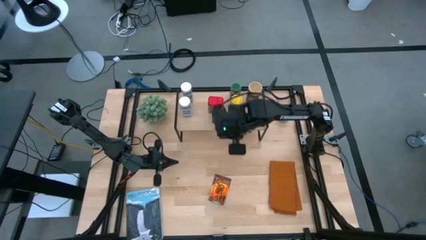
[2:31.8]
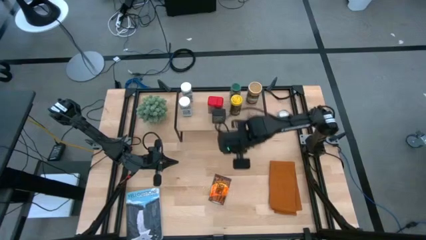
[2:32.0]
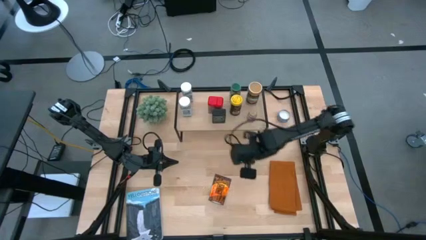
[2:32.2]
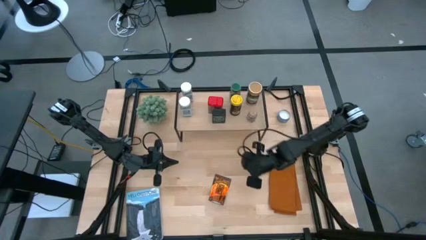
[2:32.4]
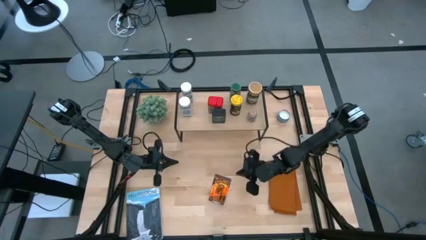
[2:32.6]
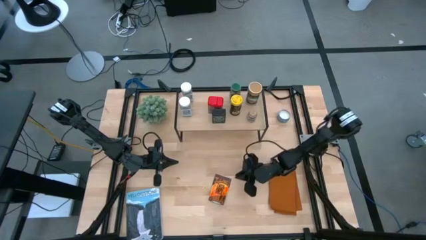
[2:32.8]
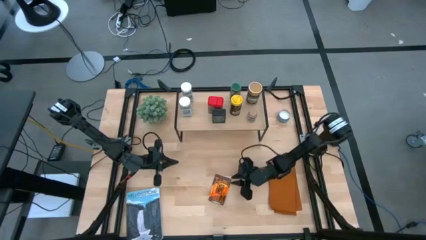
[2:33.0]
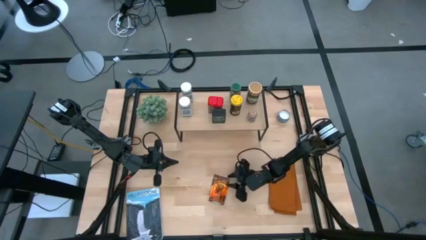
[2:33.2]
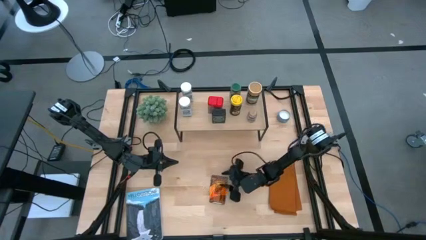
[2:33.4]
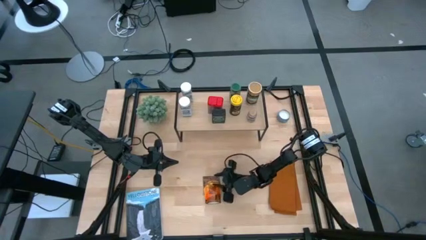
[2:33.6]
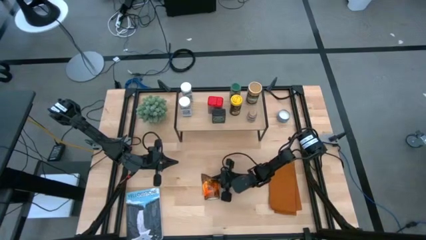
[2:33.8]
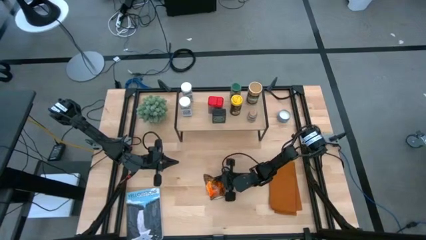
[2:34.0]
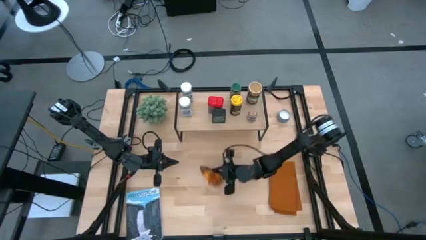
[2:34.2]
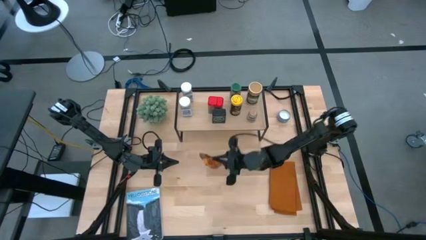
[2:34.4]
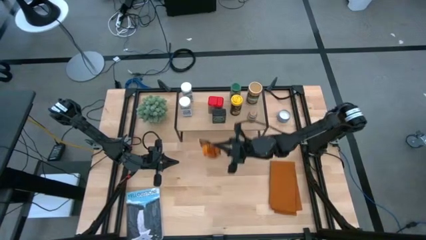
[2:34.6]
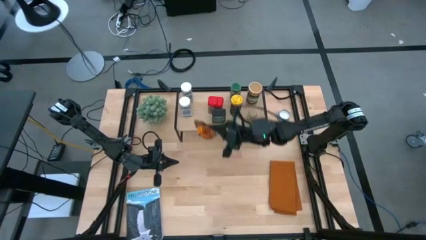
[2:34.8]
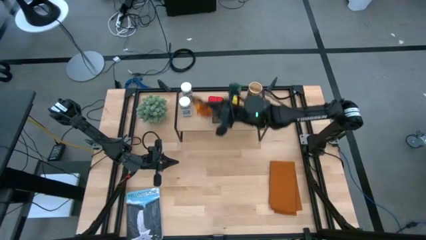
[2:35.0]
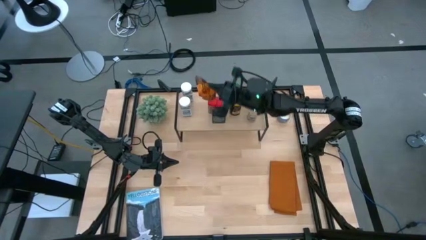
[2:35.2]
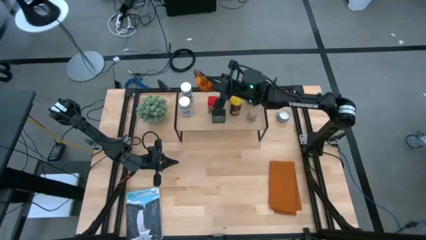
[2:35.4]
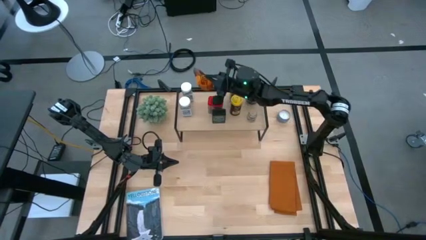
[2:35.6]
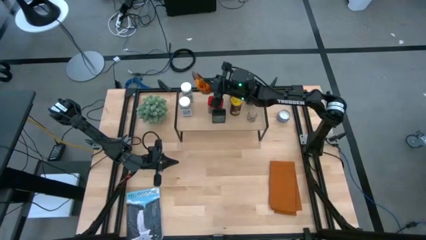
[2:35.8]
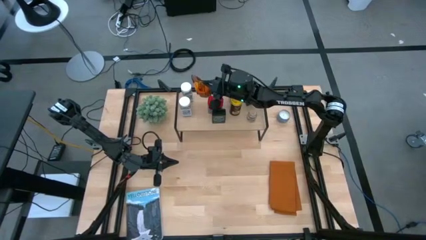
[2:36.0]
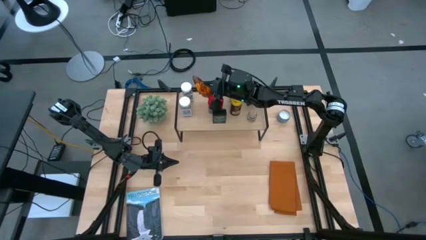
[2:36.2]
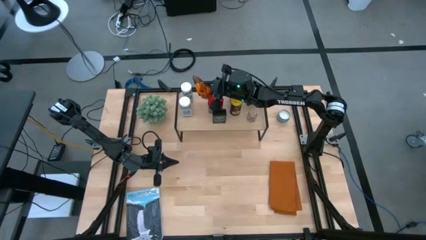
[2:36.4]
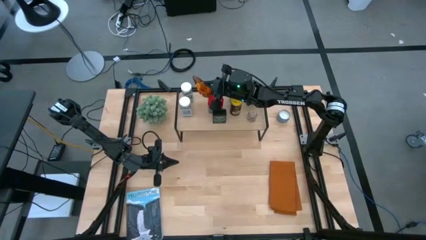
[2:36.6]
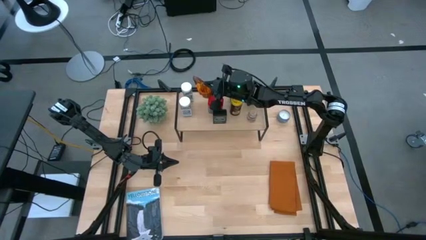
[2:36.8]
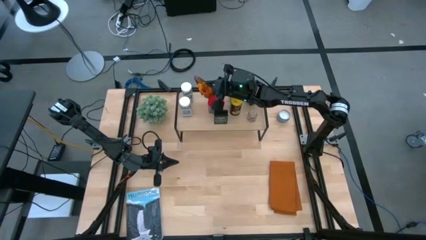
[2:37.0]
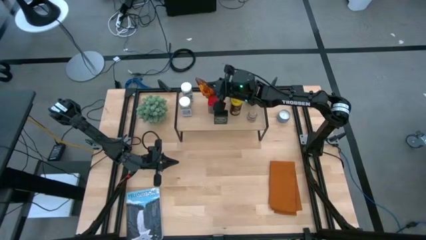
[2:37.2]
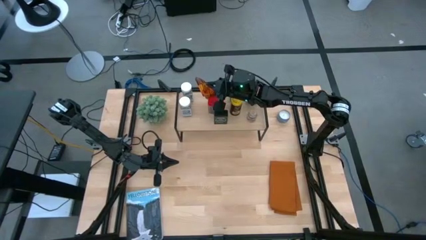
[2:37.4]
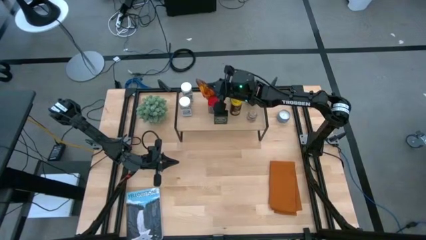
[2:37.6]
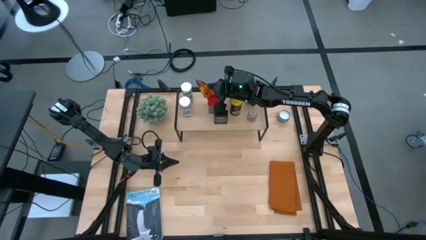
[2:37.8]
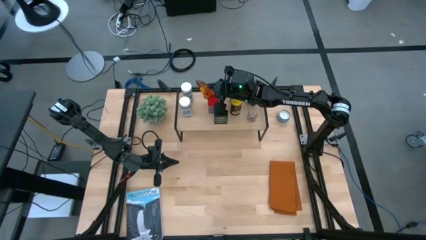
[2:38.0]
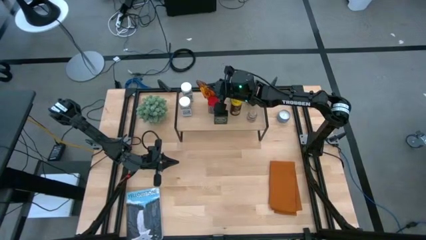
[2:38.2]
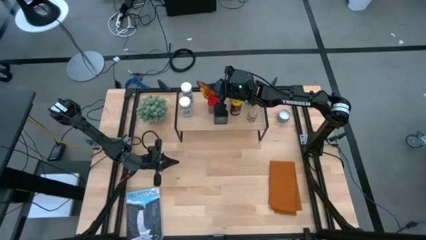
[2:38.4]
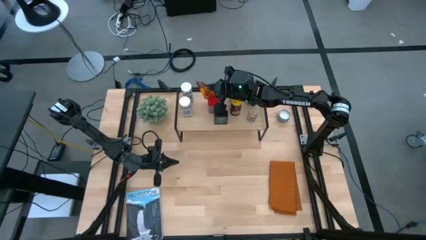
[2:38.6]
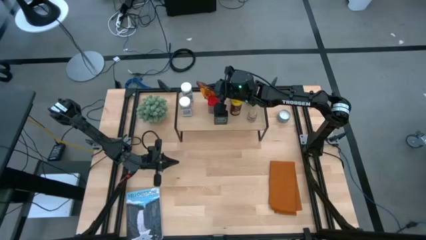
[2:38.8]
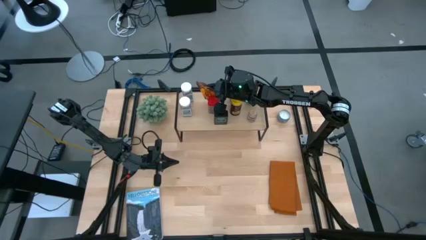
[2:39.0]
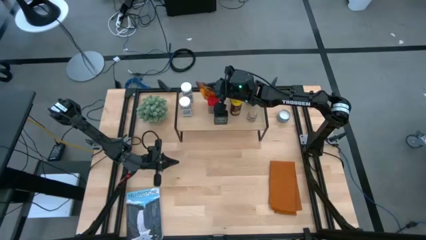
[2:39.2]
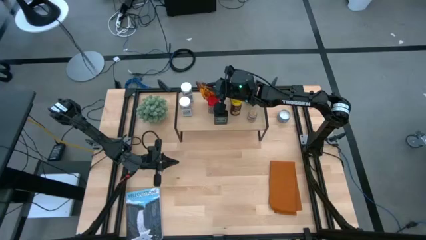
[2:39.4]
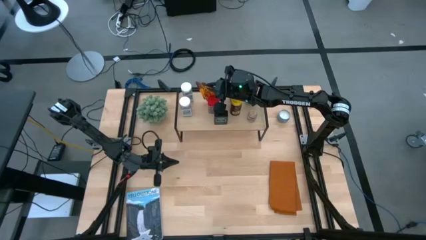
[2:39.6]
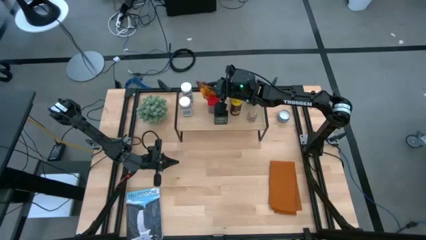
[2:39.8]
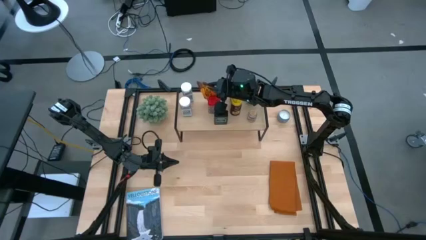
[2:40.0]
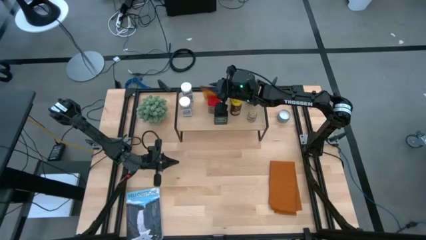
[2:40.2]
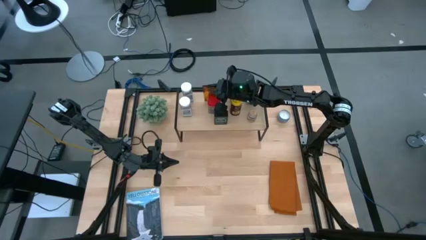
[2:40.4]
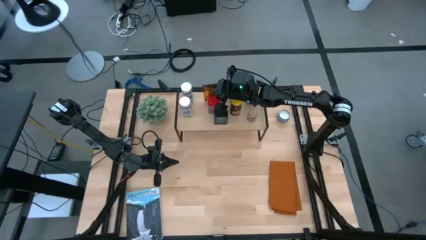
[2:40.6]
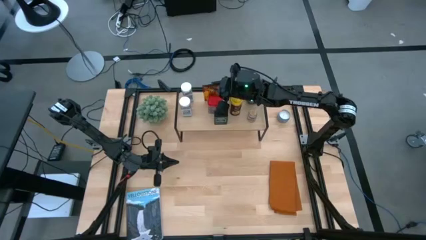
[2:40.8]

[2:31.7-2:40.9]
Task: Shelf spices
Put the orange seasoning pack onto the shelf

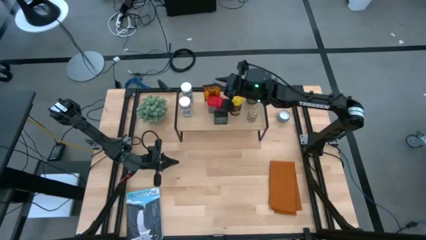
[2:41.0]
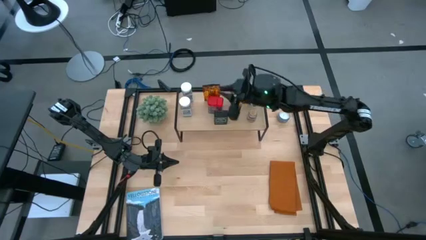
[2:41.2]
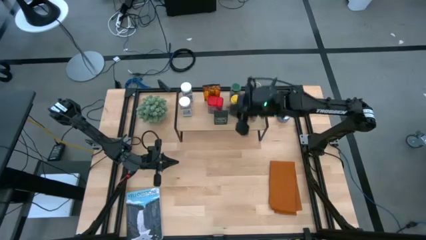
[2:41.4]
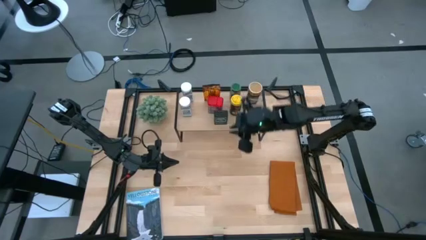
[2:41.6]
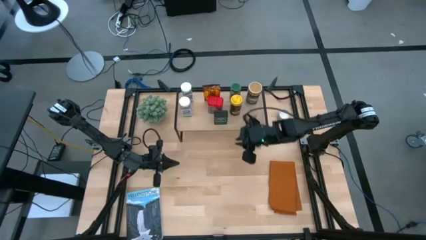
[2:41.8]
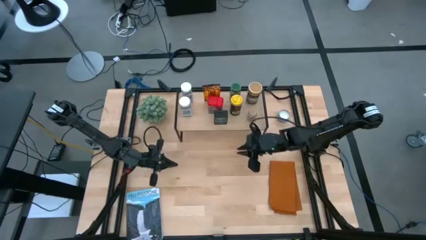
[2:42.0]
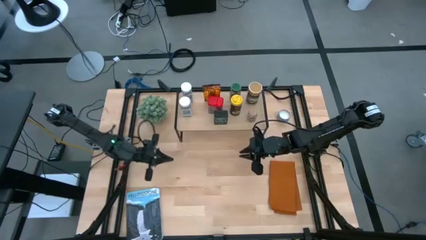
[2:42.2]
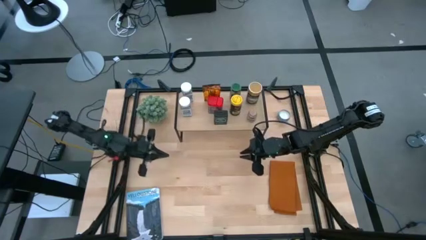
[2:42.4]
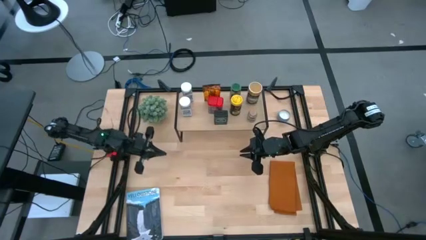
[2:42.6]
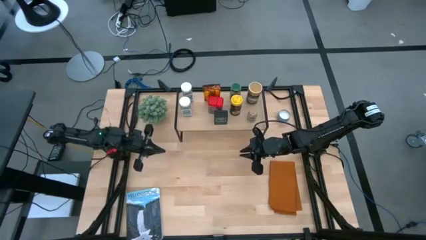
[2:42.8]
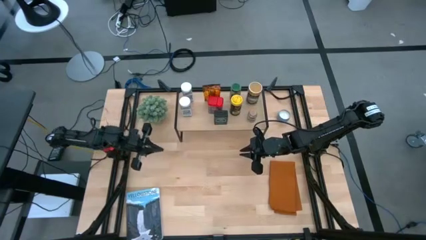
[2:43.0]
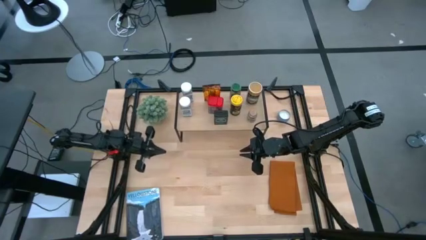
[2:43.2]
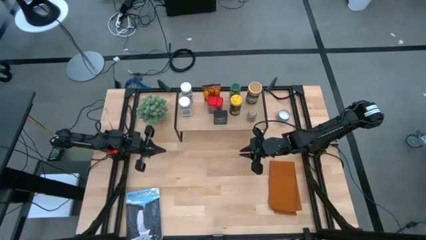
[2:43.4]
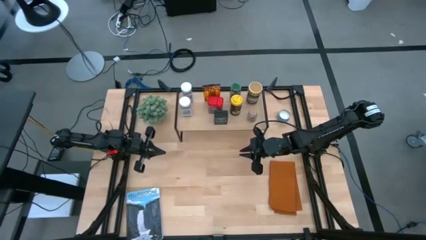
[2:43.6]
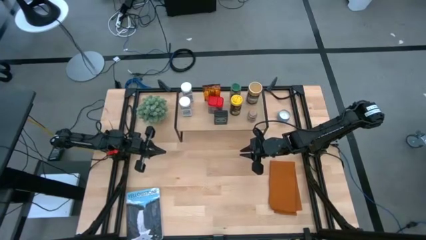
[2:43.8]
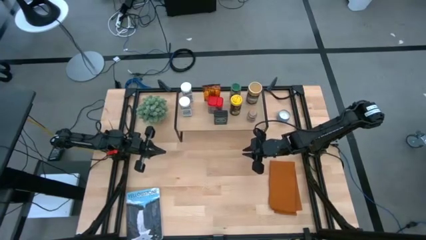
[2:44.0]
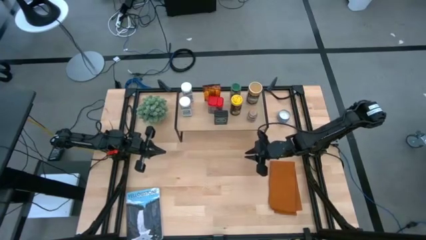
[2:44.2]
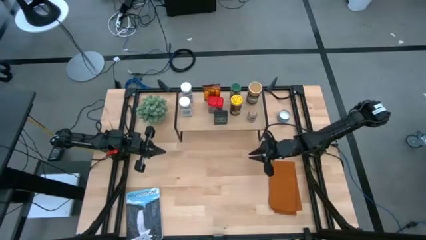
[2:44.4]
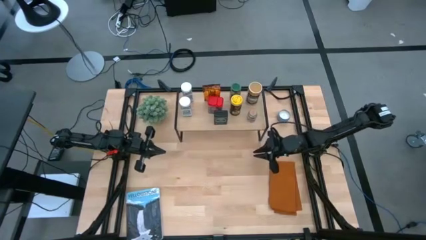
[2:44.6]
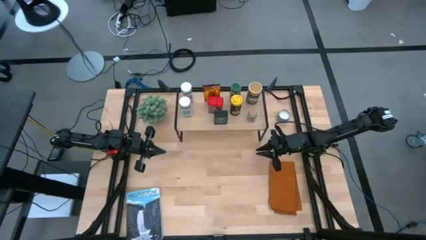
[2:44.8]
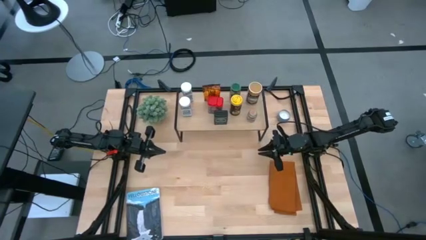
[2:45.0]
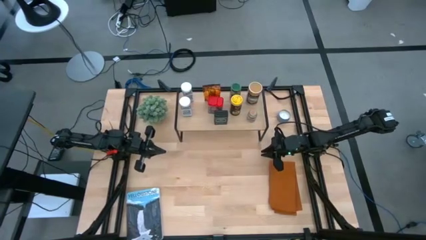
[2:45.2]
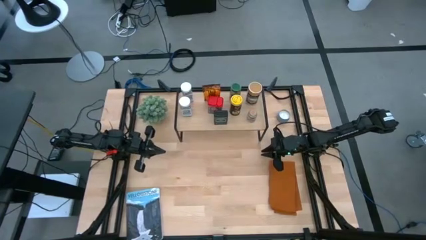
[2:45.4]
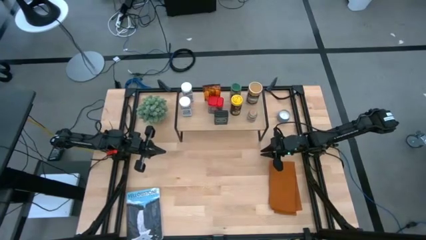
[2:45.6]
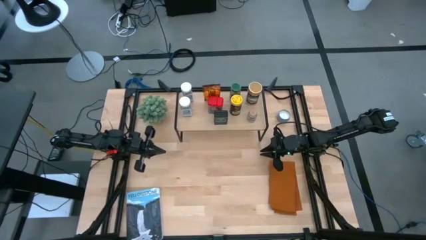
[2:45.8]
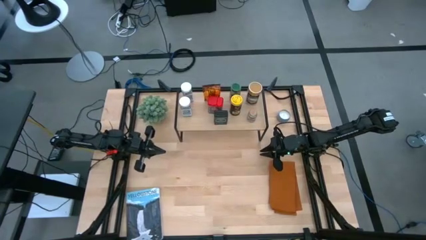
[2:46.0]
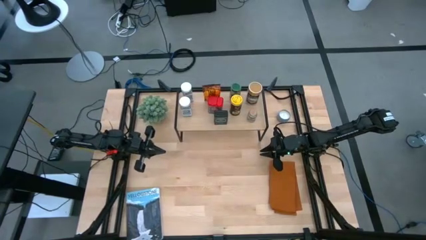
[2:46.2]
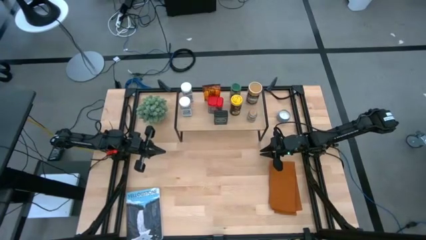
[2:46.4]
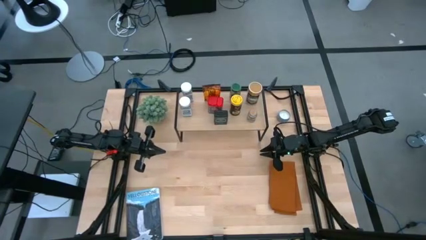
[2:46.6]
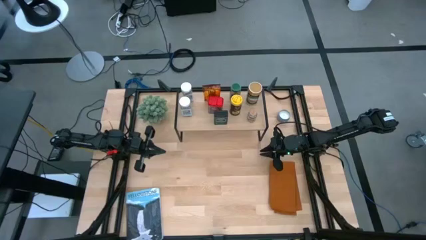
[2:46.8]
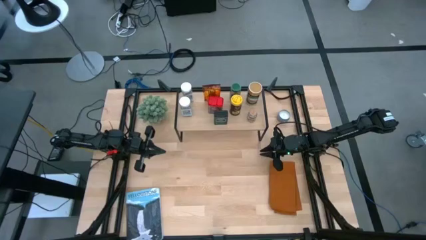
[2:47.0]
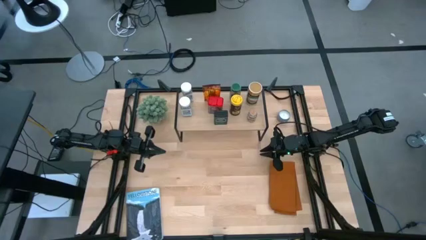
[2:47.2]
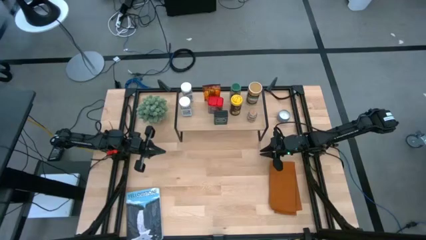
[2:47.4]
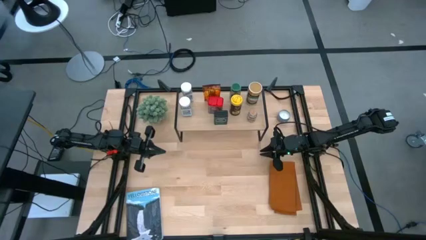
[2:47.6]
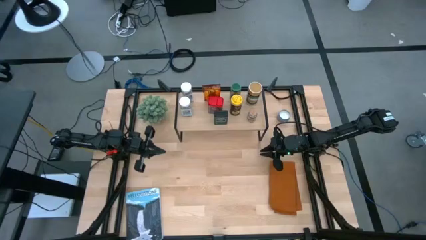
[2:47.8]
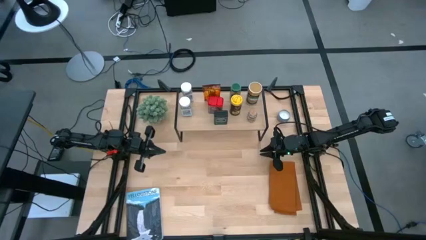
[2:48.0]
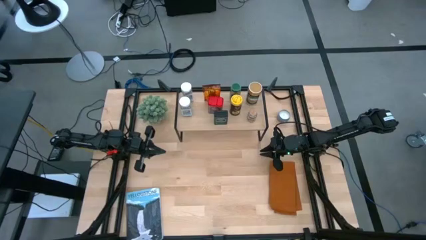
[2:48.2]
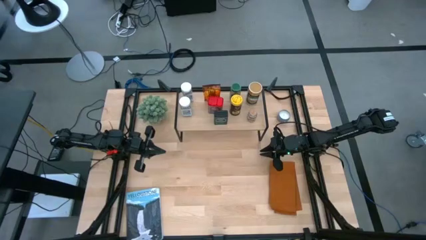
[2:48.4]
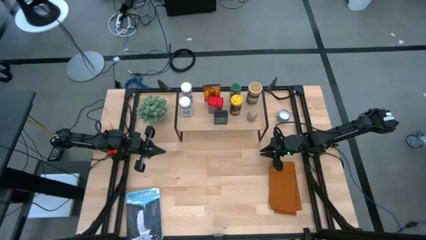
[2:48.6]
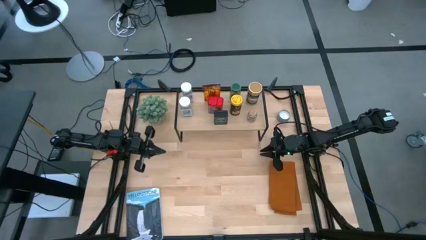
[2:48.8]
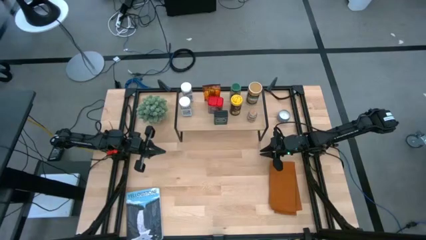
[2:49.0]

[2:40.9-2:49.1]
Return to Home Position
